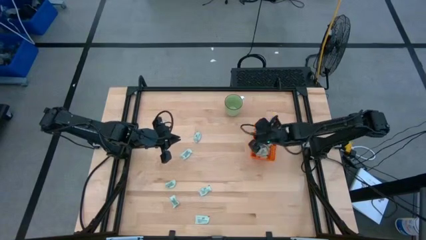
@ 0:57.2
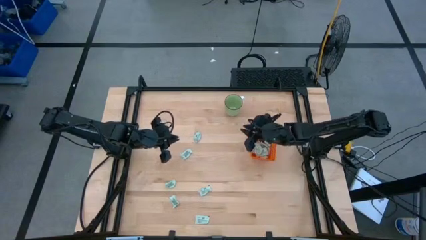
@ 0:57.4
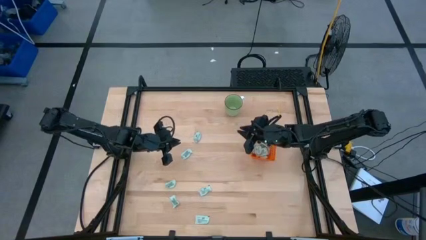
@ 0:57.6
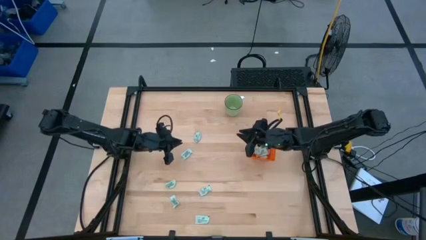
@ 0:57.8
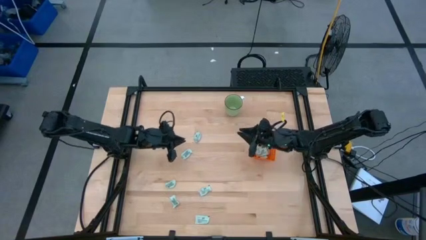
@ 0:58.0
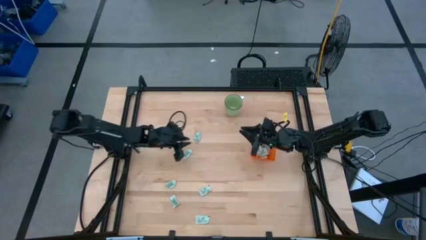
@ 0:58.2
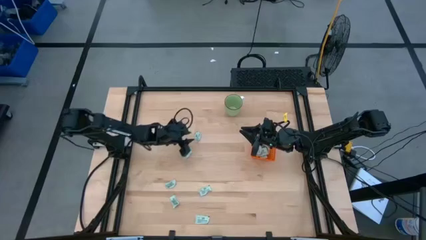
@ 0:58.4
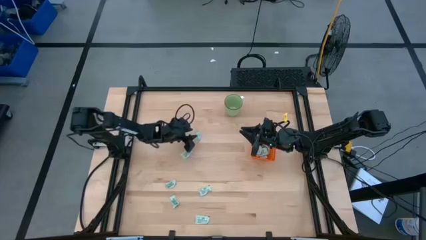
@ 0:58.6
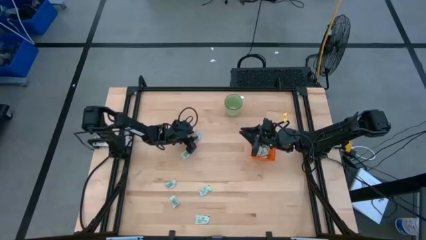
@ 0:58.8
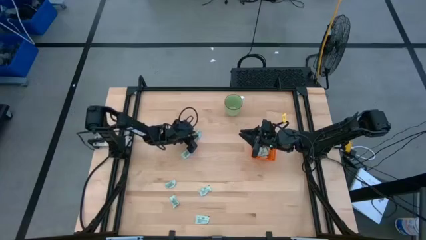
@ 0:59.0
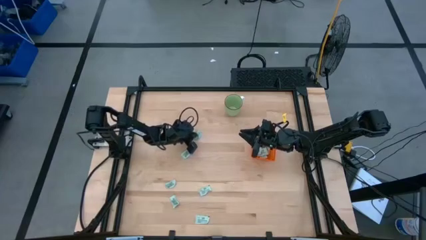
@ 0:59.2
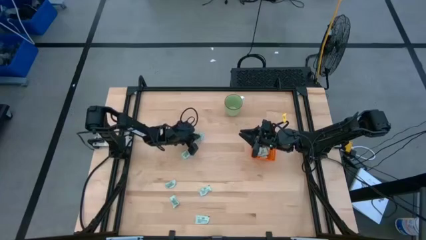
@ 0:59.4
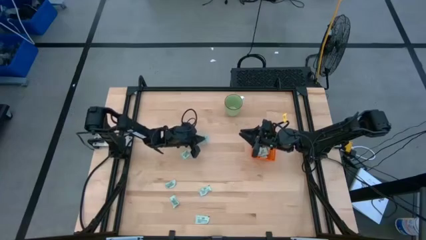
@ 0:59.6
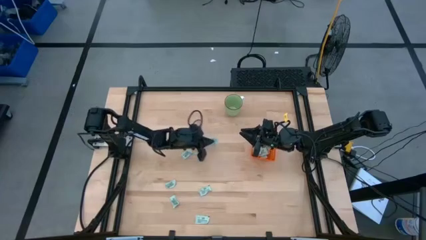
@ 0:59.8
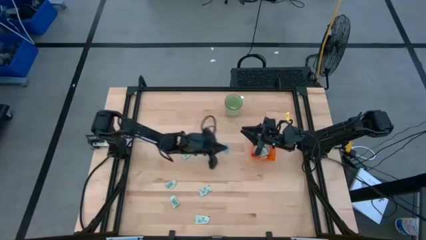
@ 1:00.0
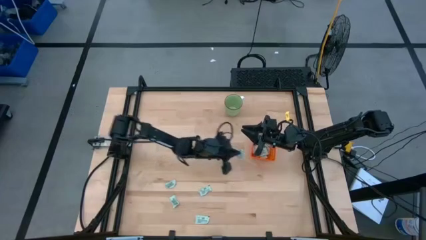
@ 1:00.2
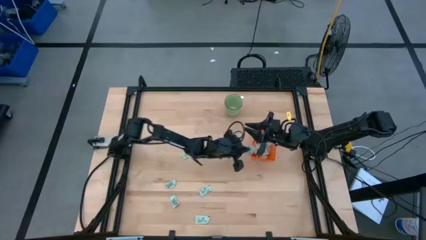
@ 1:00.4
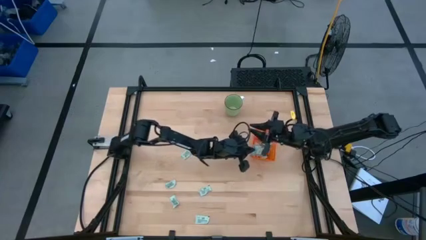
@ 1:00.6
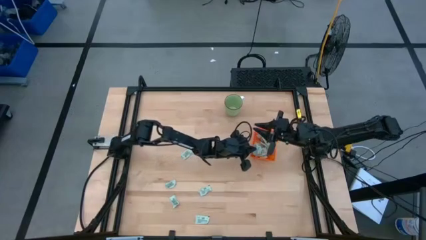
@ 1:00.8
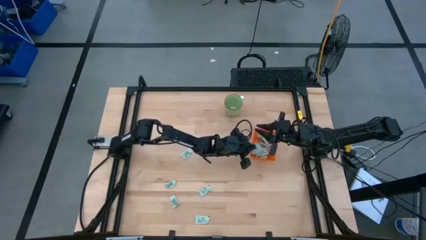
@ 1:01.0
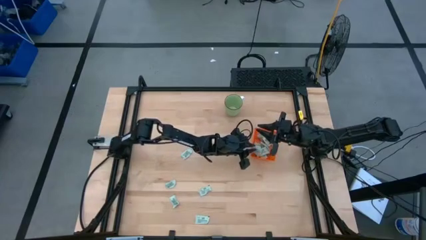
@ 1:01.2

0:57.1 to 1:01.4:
Task: Pick and place Stevia / Truvia into bins
Put the light green packet into the orange basket

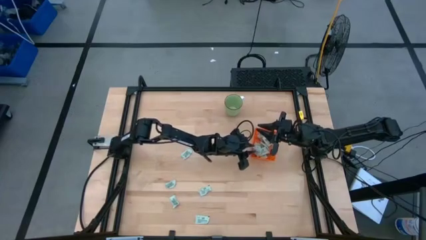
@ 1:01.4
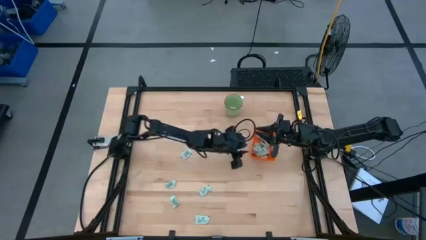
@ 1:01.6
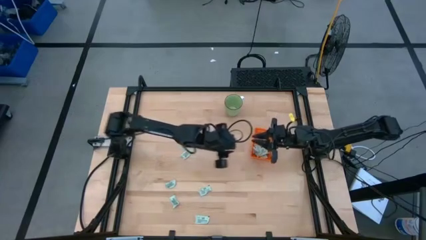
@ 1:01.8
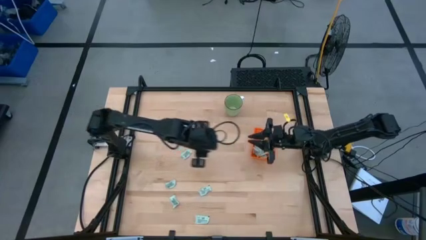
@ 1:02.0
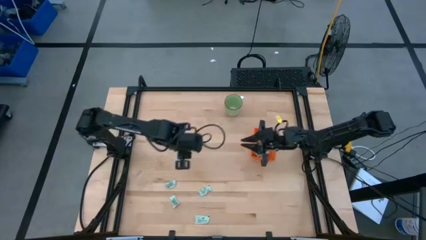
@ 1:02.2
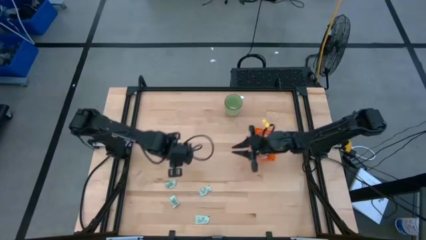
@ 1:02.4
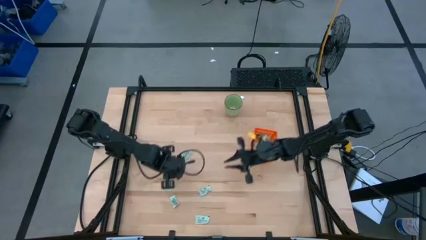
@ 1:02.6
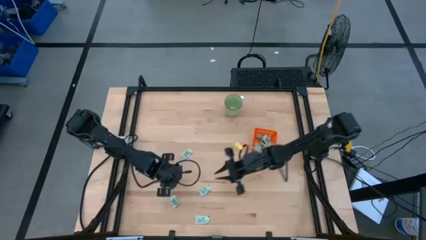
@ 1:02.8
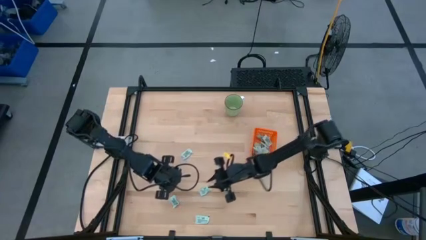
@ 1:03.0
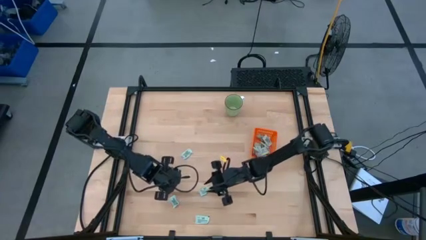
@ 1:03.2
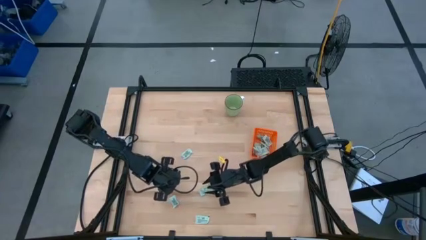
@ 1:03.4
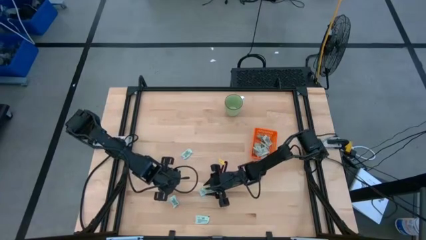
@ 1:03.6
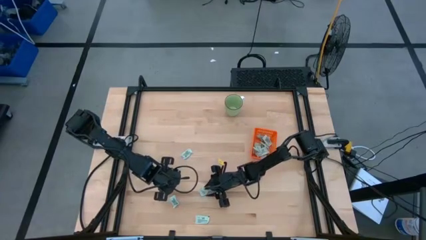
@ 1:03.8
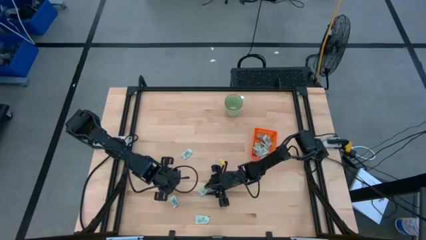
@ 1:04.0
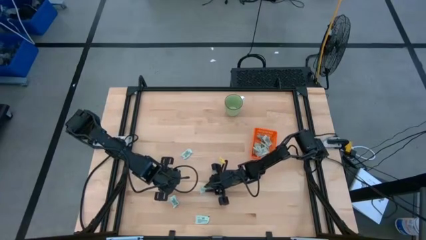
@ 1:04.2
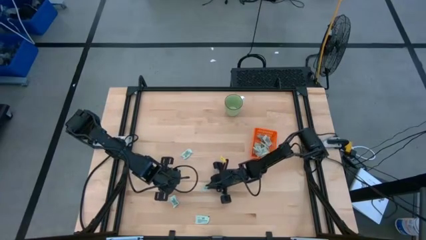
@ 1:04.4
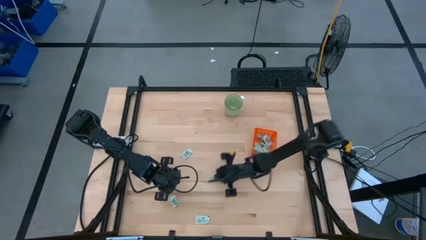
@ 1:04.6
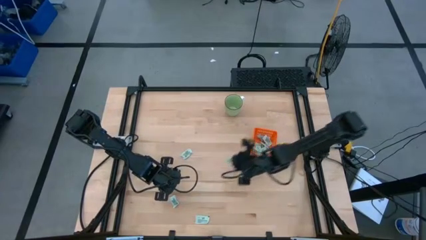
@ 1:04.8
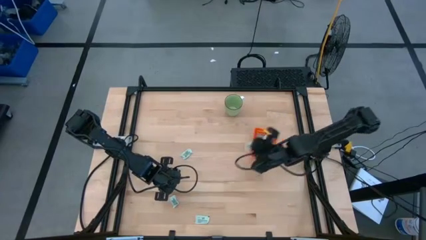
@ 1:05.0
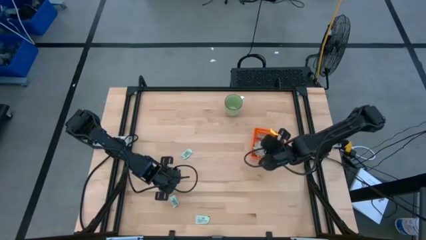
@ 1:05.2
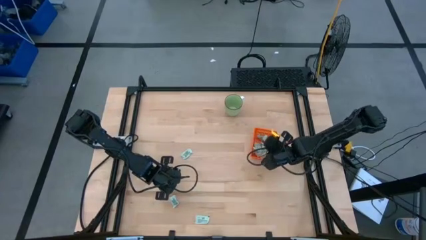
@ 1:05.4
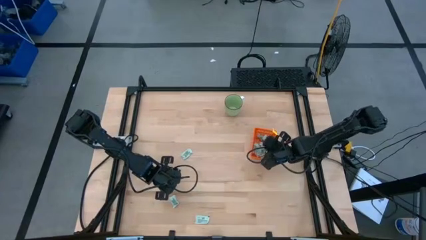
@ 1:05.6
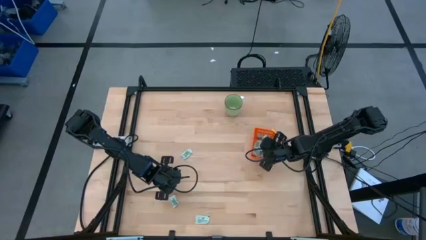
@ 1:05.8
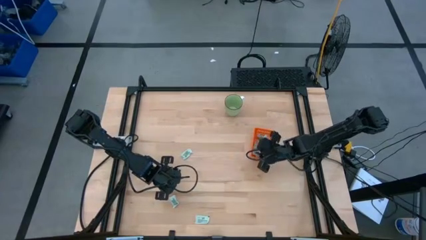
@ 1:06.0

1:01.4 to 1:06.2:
Put the white stevia packet into the orange basket bin

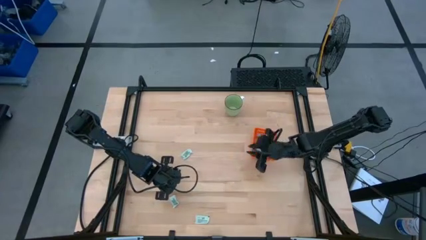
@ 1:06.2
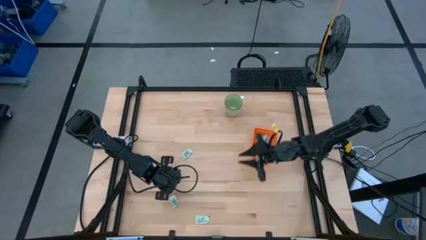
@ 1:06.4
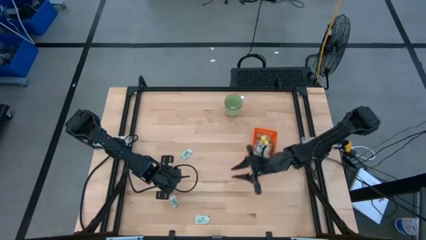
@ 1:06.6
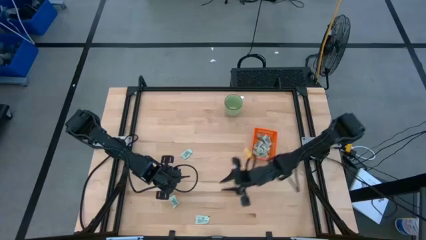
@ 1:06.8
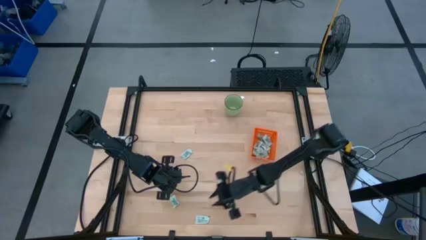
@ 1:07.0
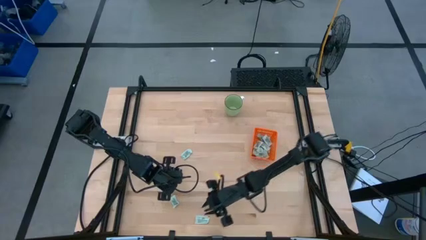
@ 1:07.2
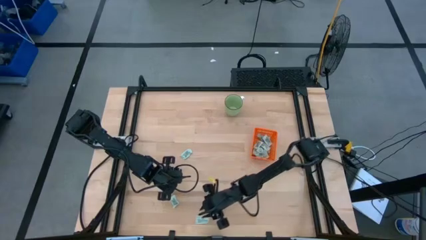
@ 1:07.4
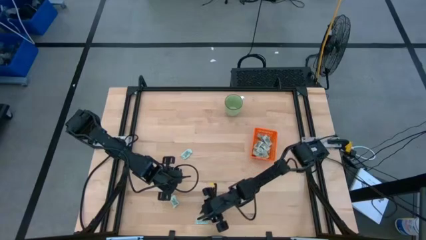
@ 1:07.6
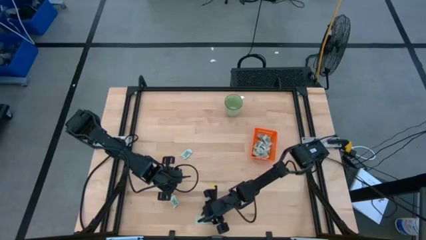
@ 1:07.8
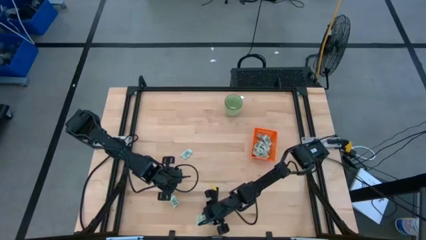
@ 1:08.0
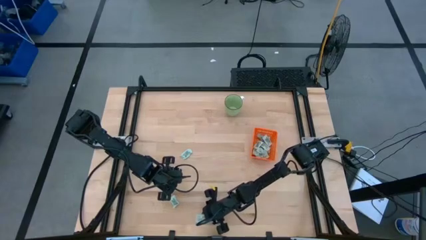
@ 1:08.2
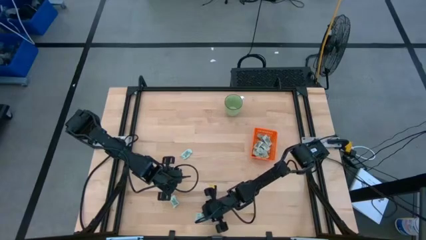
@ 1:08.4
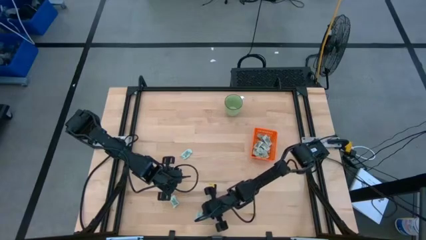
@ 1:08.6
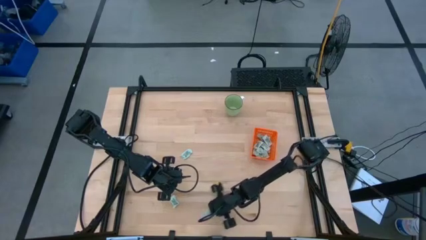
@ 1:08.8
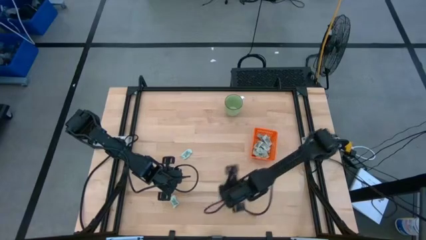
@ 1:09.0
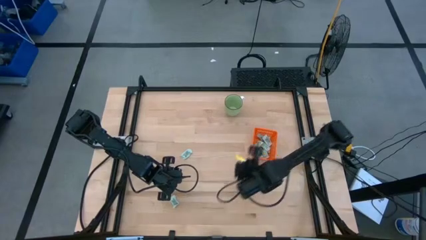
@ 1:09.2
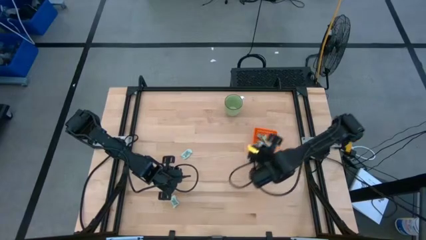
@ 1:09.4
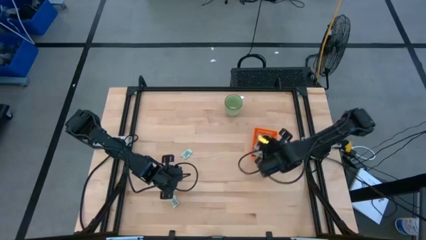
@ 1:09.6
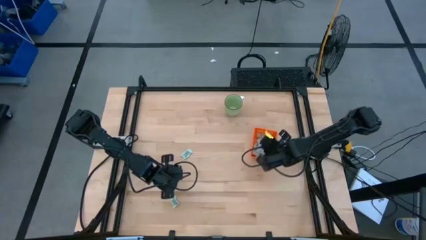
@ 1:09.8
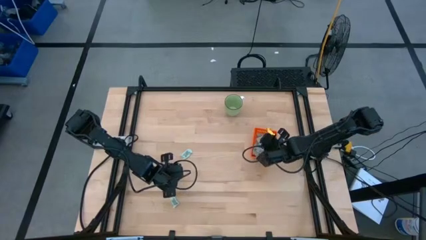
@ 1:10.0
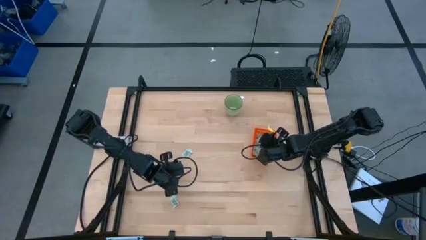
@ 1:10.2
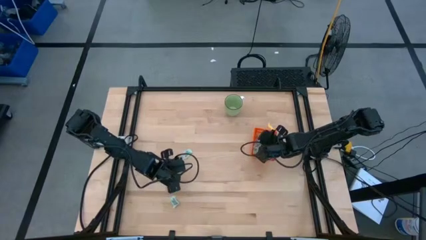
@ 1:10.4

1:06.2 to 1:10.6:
Put the light green packet into the orange basket

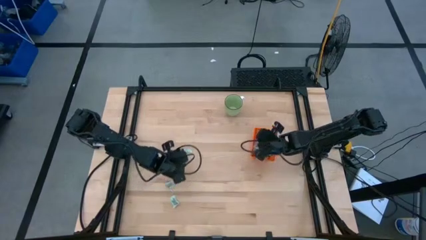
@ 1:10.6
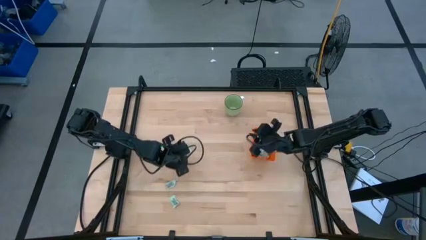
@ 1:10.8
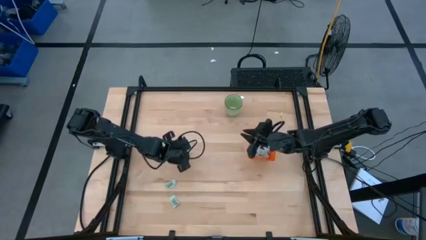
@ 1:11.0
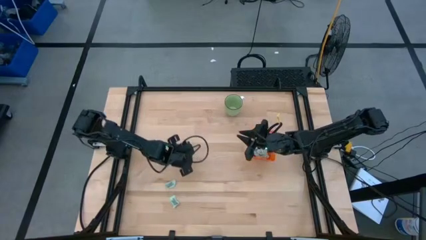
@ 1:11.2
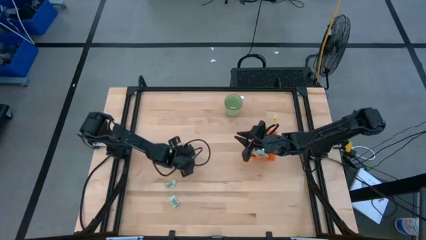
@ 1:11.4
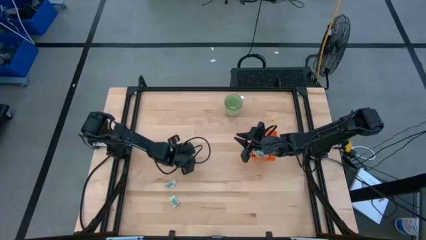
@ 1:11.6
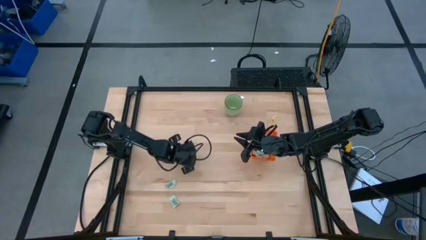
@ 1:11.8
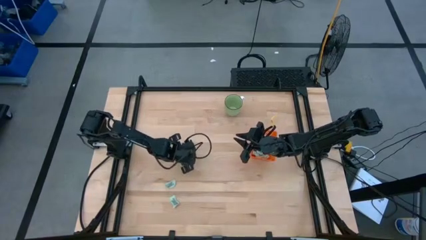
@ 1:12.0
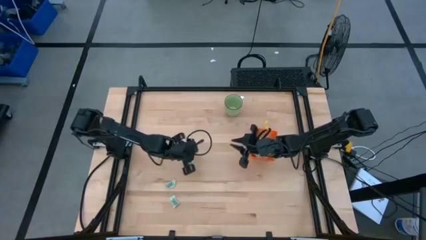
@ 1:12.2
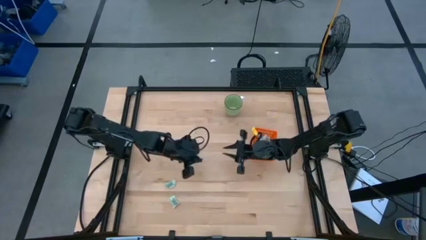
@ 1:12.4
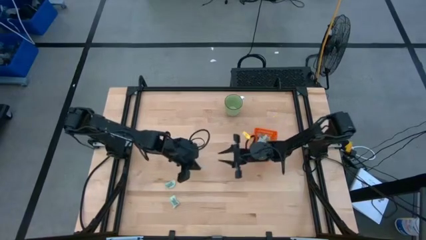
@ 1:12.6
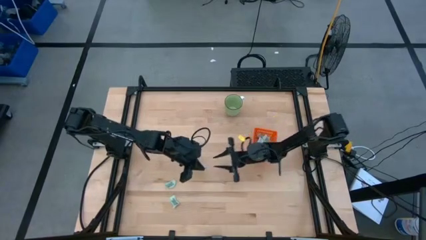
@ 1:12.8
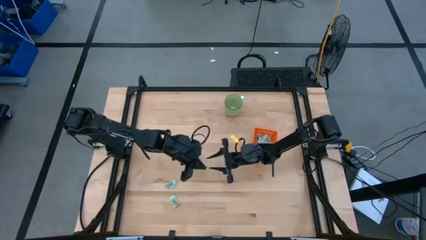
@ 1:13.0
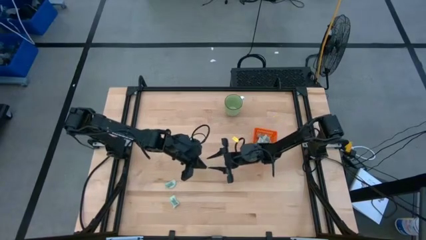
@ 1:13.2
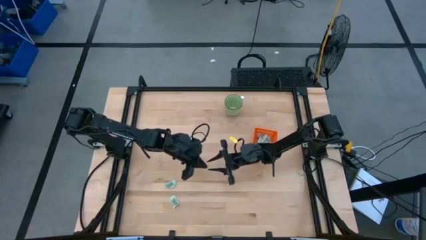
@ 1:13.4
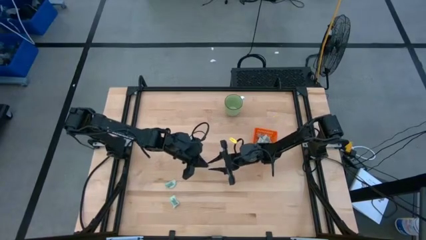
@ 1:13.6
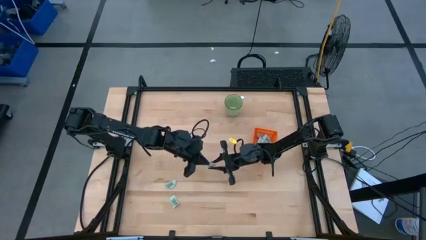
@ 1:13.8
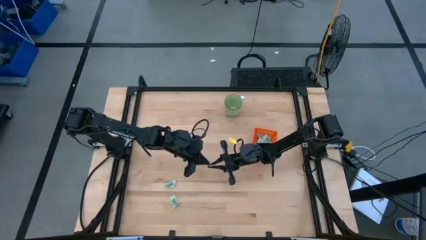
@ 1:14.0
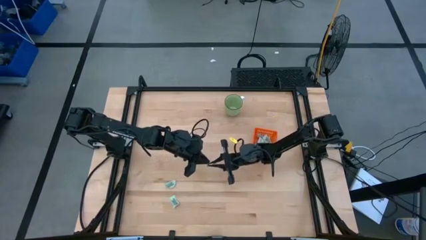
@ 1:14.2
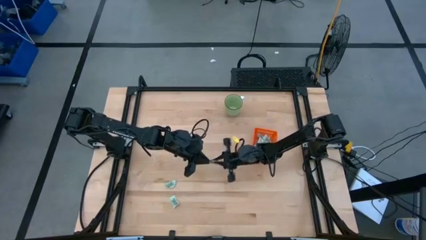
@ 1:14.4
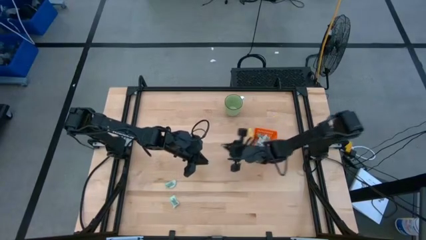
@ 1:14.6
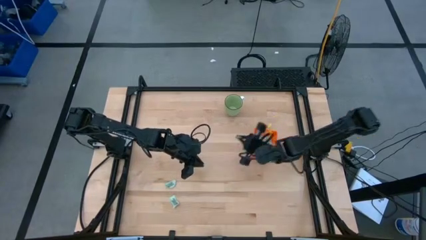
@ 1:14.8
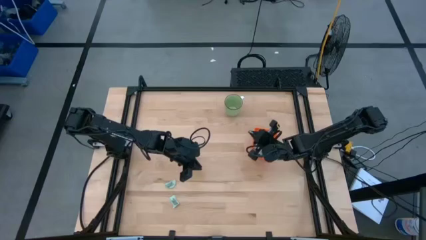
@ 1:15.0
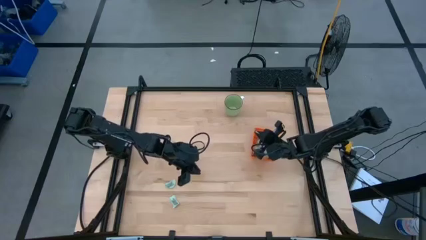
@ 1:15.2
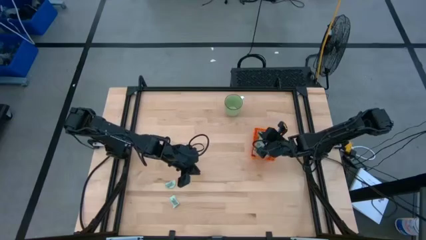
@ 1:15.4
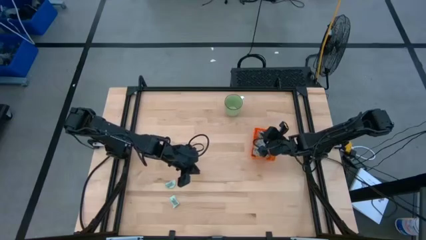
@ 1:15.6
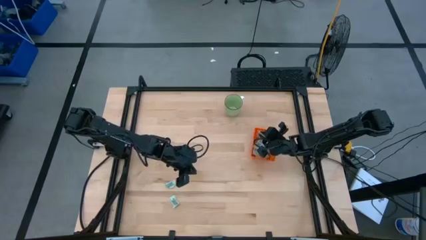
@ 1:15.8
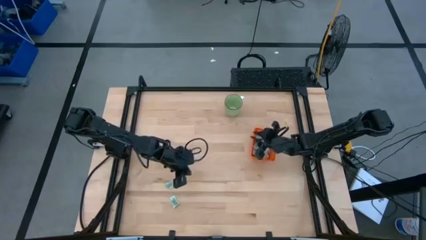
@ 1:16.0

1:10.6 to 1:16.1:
Put the light green packet into the orange basket
